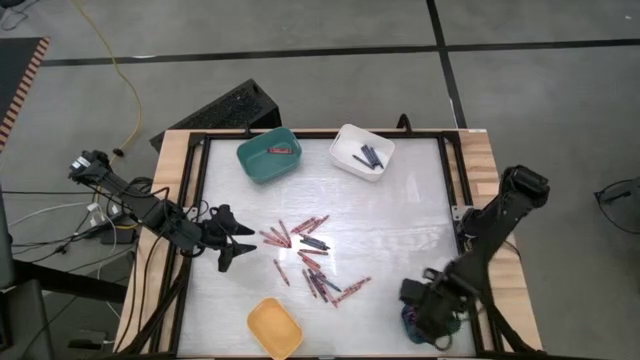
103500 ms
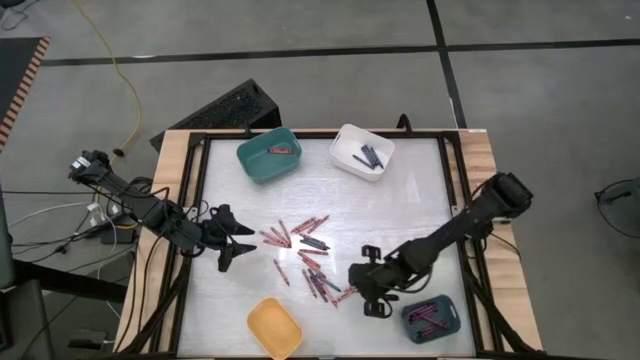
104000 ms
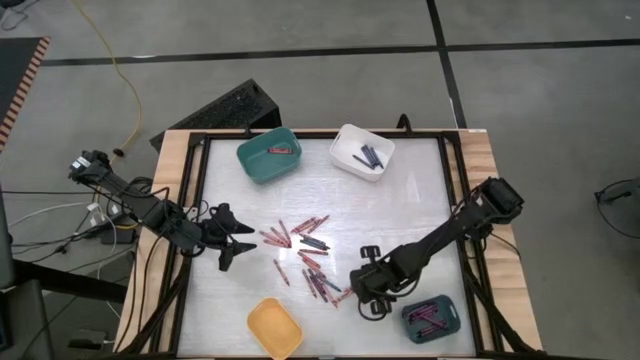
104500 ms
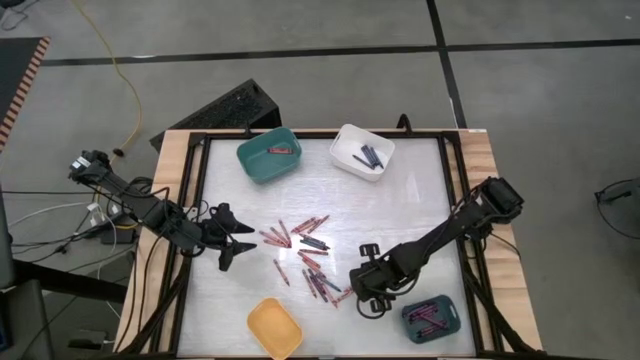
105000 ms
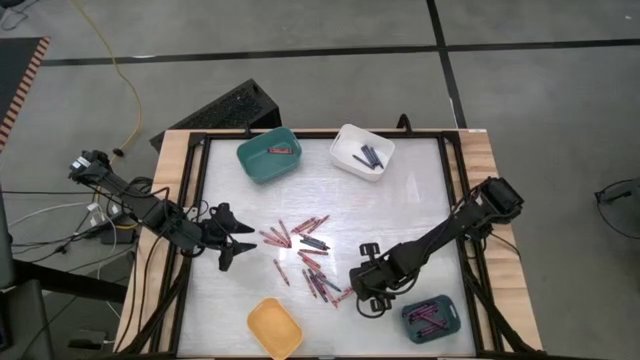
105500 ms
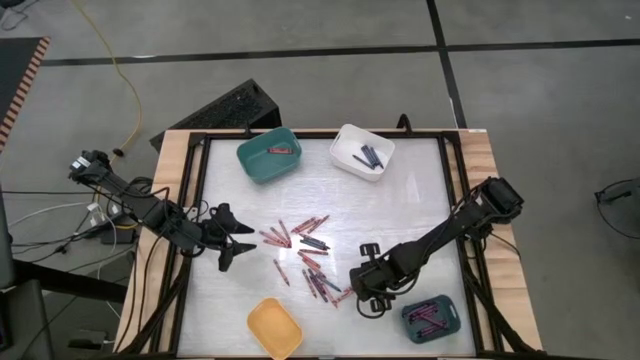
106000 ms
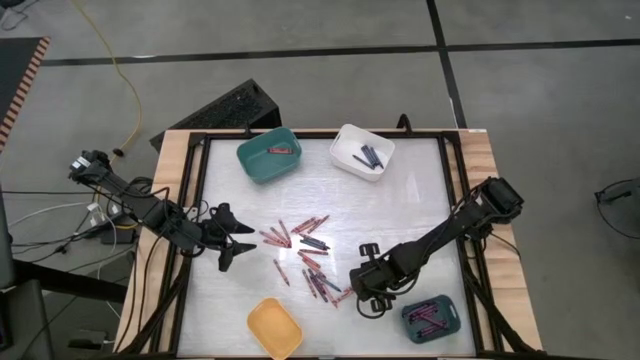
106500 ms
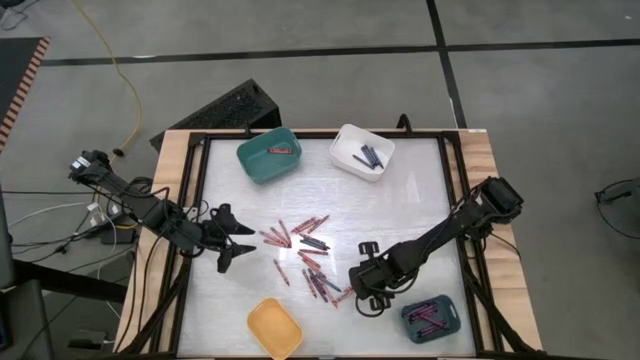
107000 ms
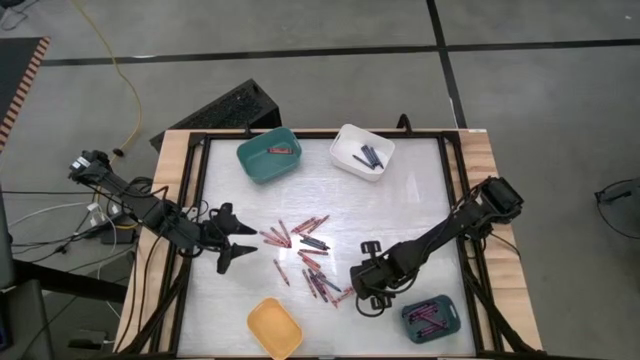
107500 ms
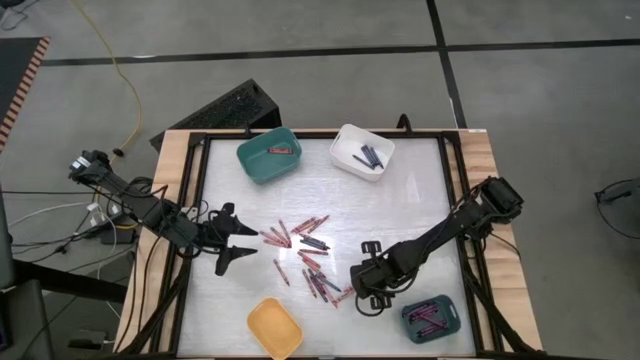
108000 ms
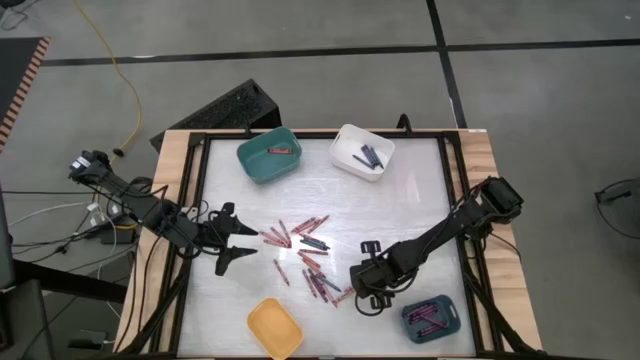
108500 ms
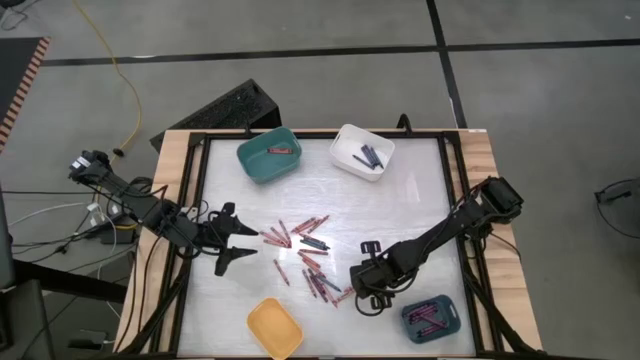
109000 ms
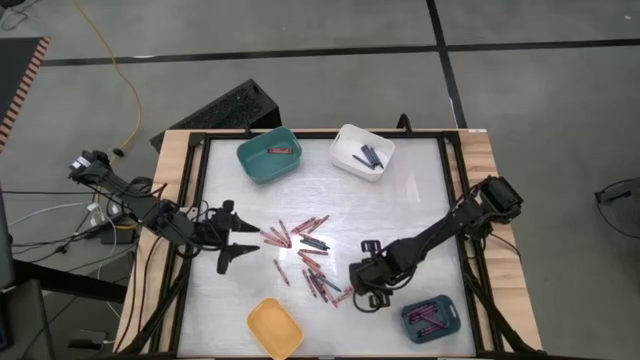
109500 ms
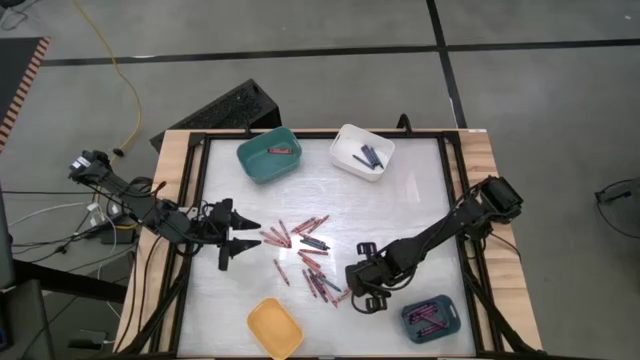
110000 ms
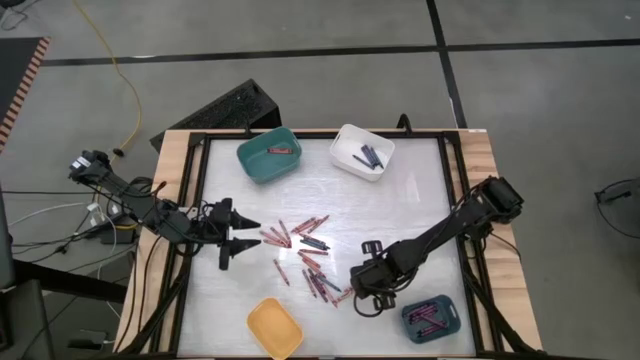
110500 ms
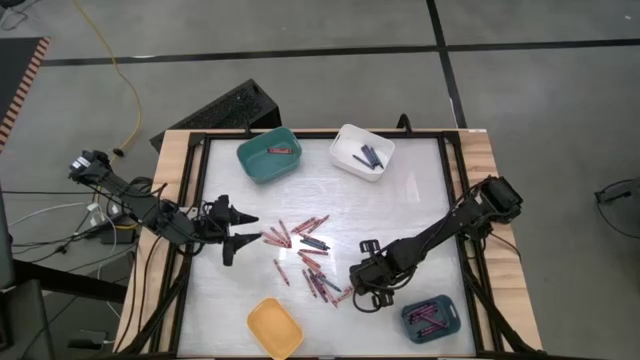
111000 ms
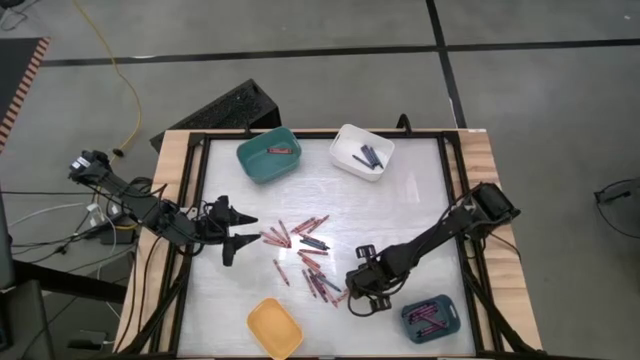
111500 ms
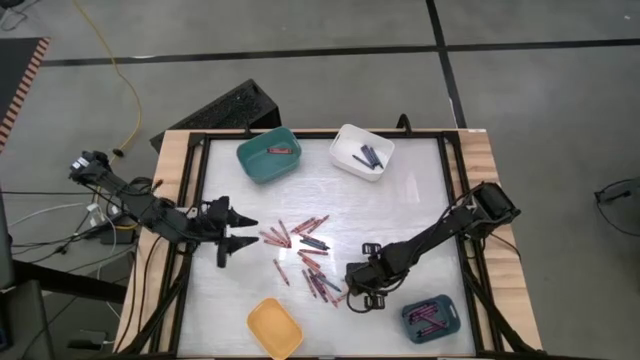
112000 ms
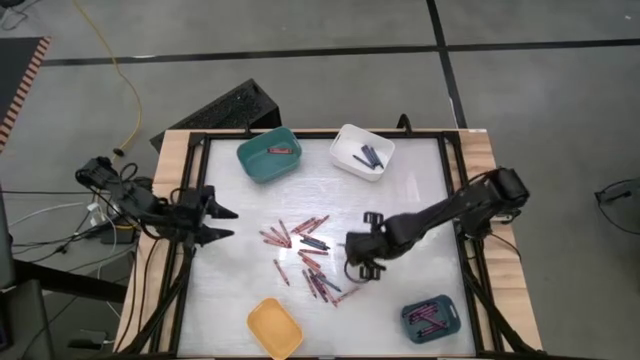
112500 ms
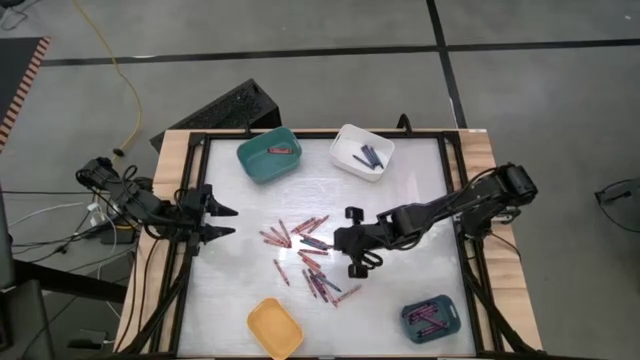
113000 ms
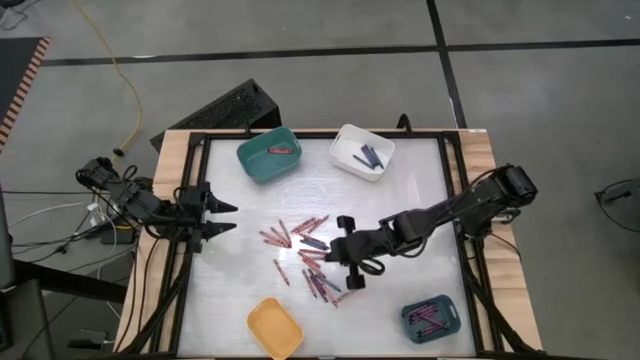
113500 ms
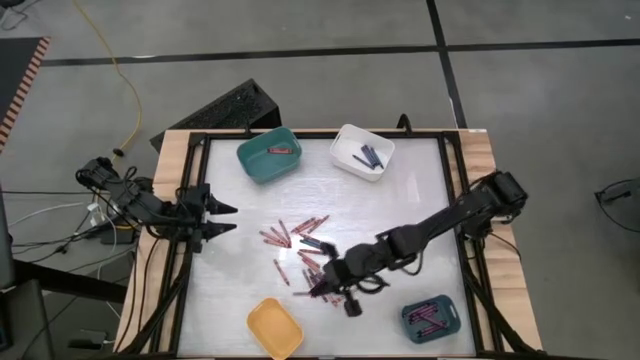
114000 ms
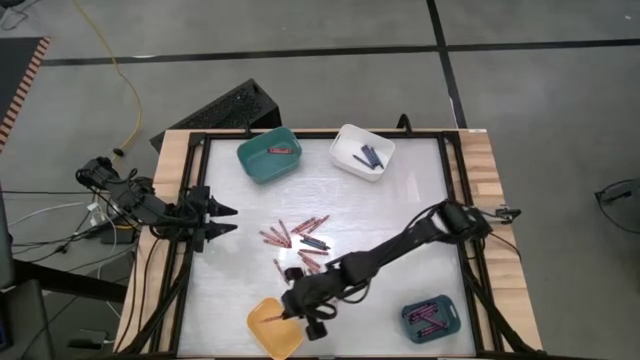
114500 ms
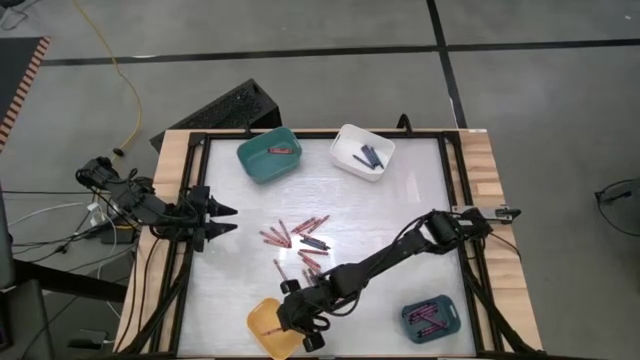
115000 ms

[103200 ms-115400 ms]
Task: Sort crayons
Put the pink crayon into the yellow bin

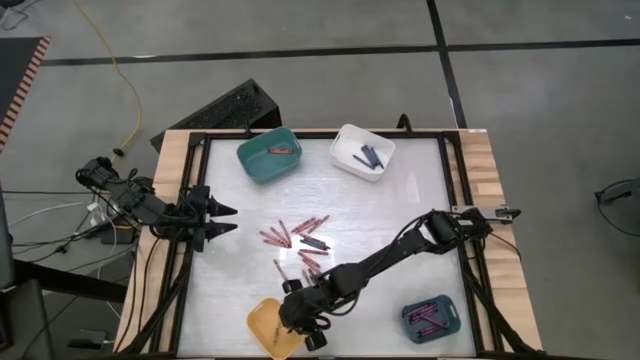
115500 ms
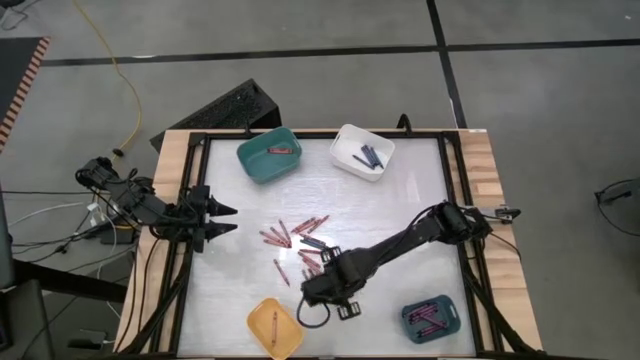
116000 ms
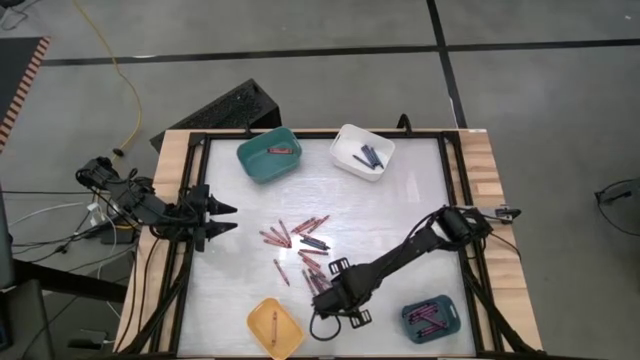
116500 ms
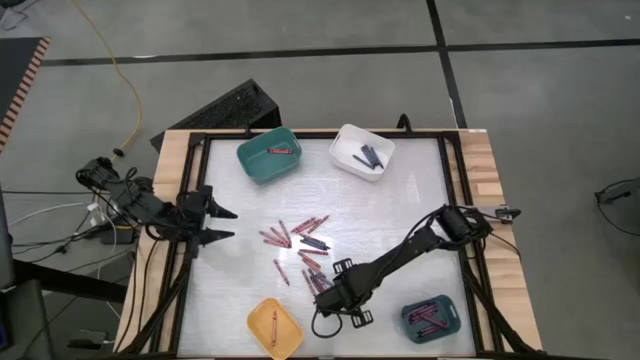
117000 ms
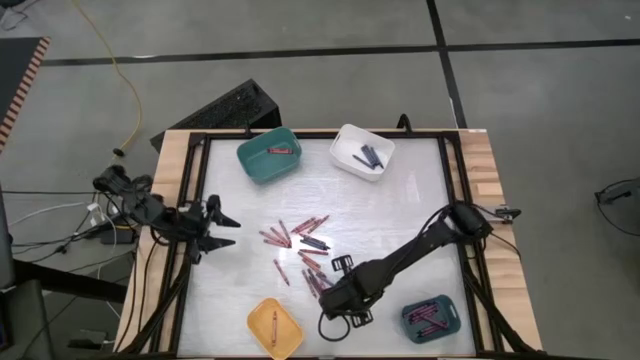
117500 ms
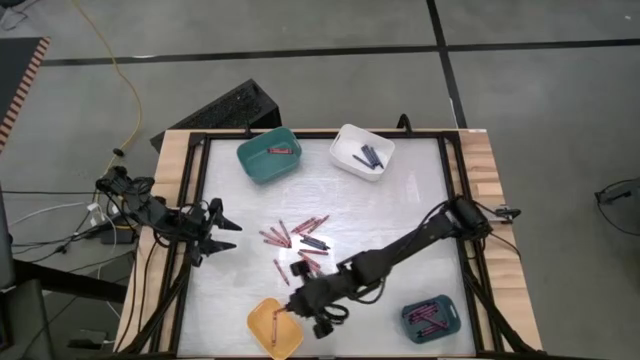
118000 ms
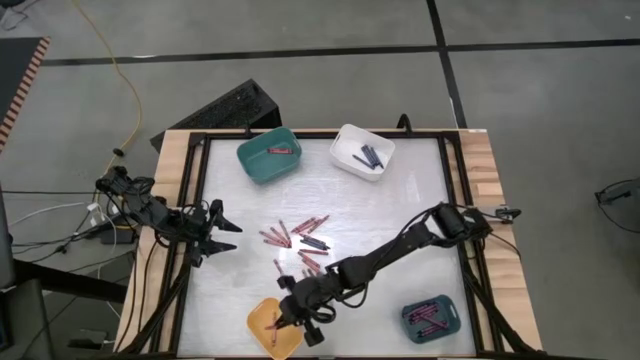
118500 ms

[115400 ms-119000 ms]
Put the pink crayon into the yellow bin

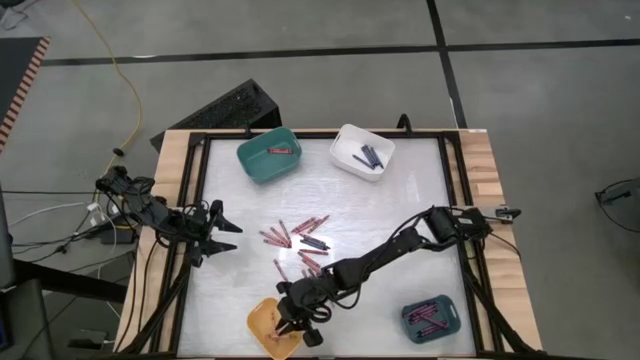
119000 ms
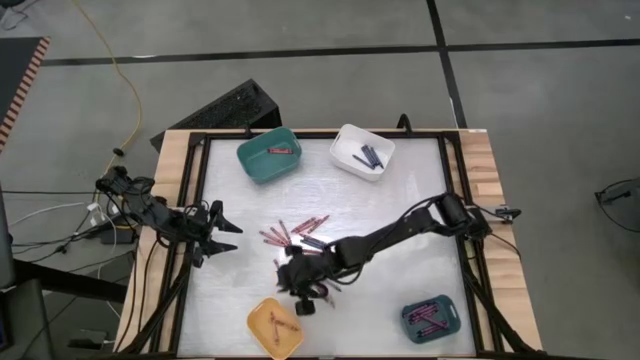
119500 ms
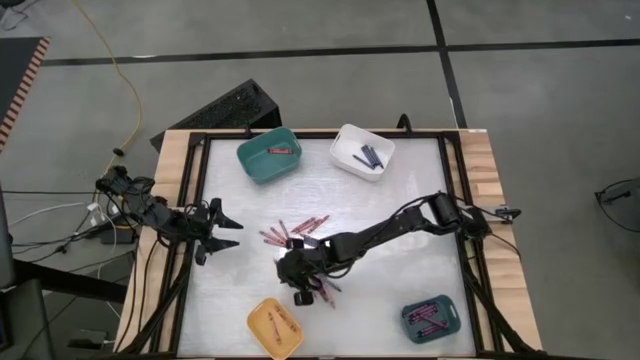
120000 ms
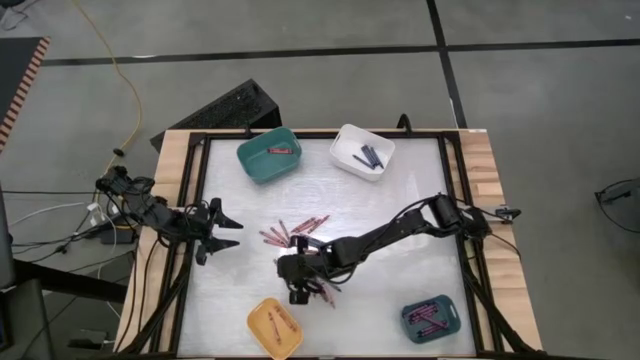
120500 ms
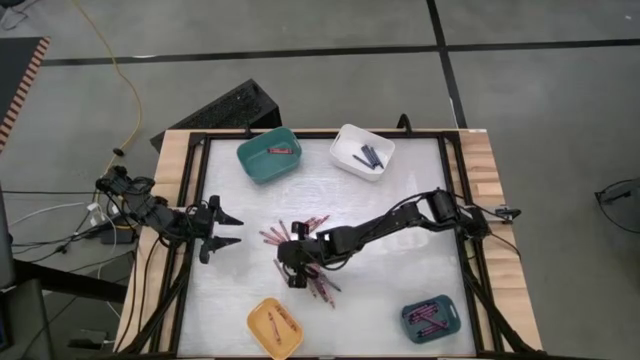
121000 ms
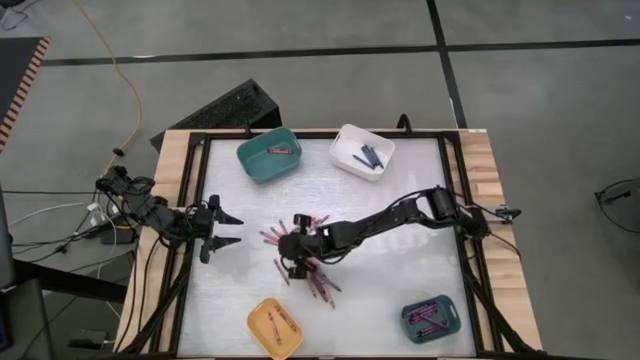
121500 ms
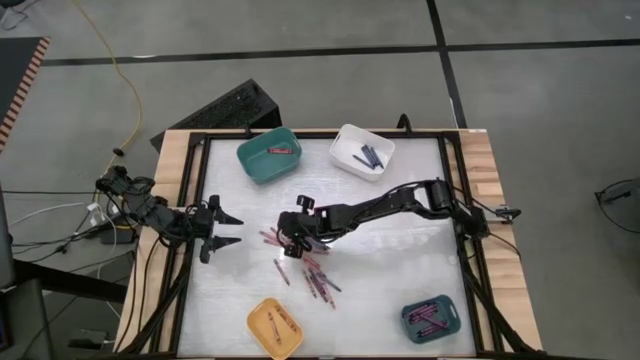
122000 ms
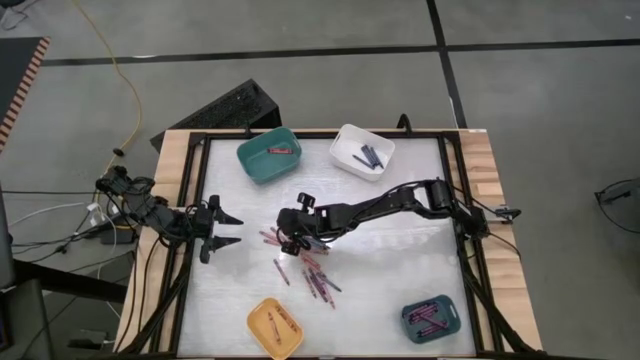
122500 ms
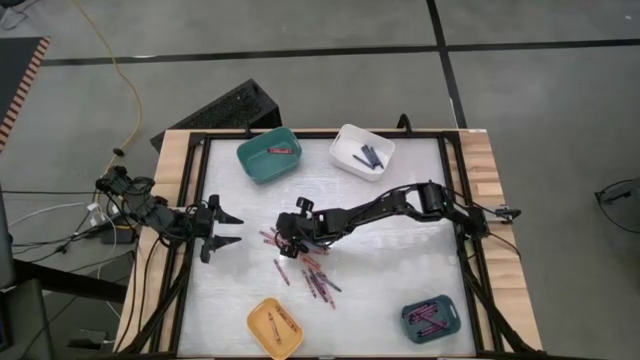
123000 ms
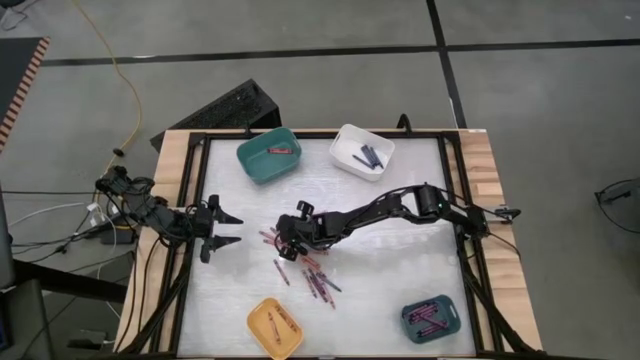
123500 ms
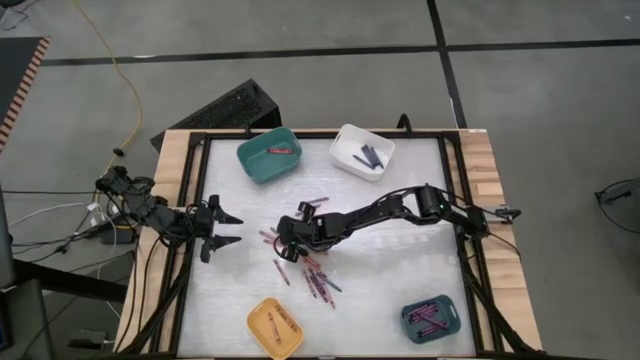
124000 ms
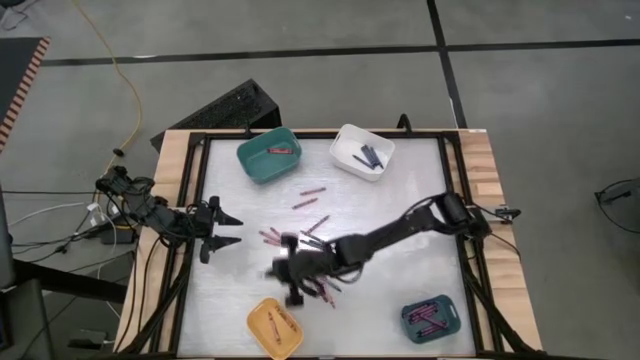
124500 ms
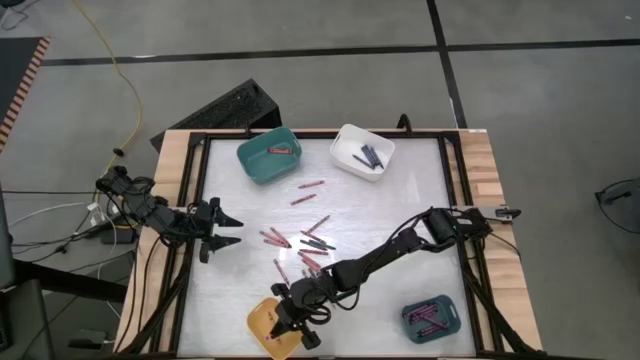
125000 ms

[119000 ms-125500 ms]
Put the pink crayon into the yellow bin
